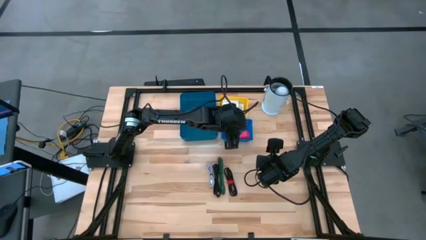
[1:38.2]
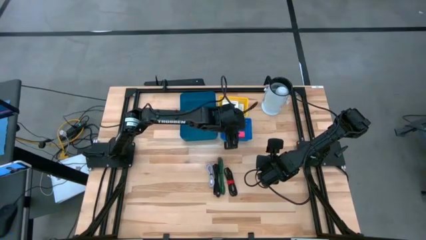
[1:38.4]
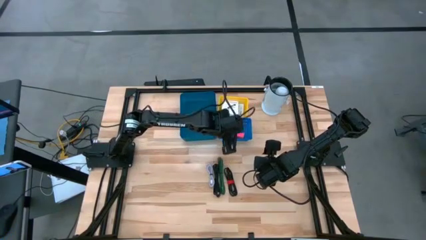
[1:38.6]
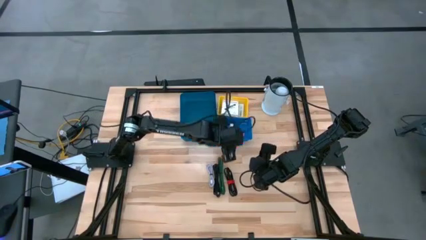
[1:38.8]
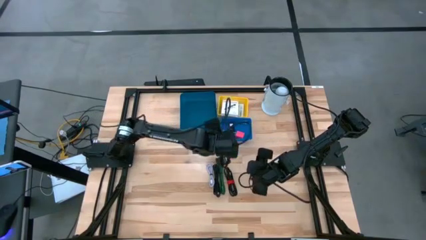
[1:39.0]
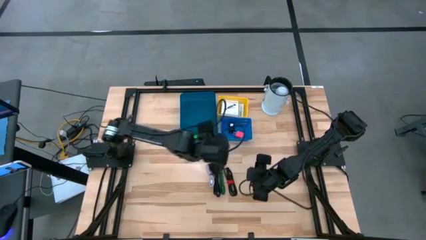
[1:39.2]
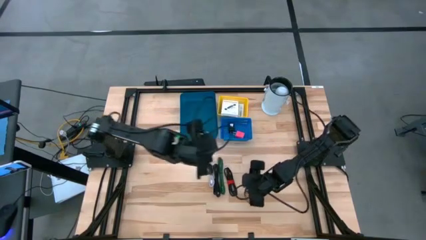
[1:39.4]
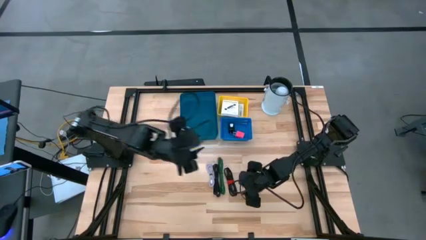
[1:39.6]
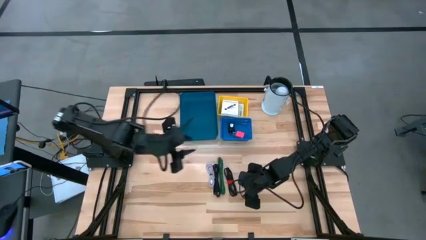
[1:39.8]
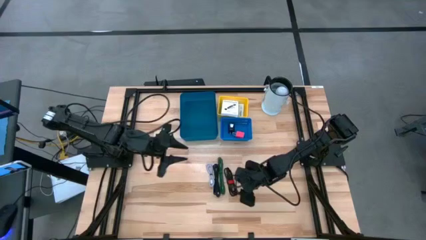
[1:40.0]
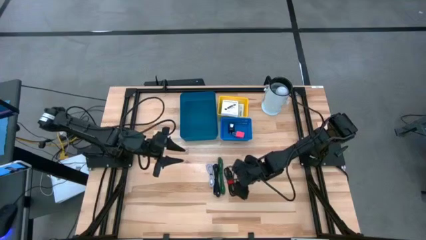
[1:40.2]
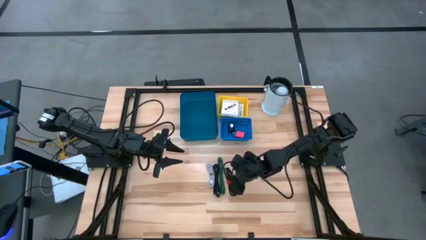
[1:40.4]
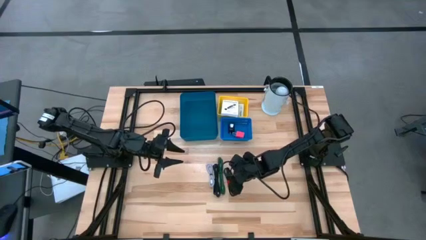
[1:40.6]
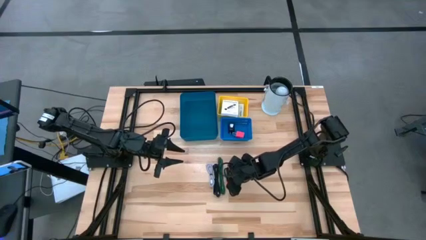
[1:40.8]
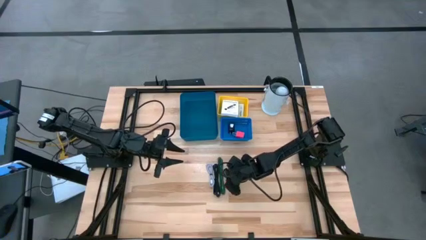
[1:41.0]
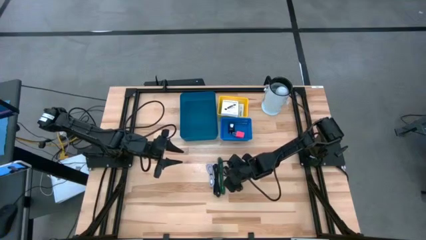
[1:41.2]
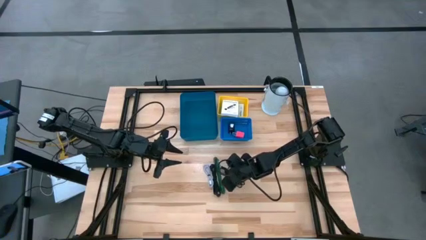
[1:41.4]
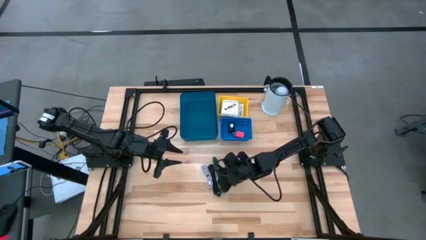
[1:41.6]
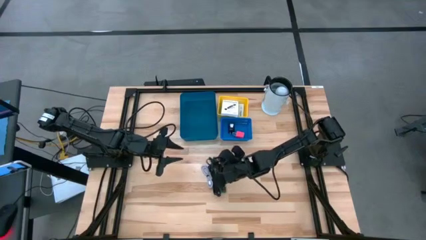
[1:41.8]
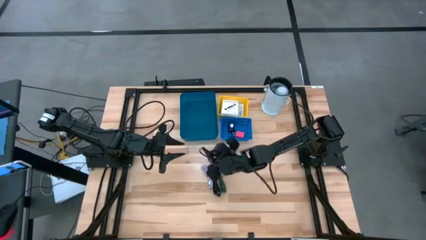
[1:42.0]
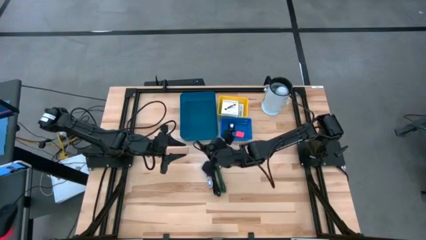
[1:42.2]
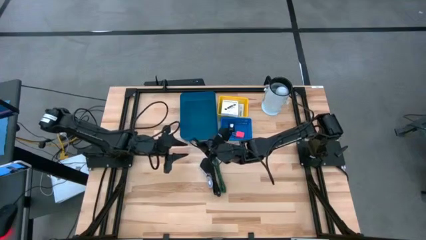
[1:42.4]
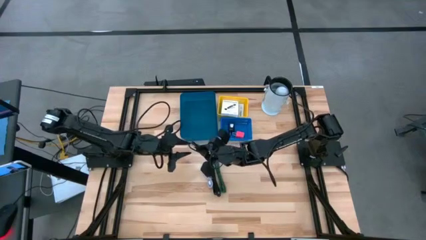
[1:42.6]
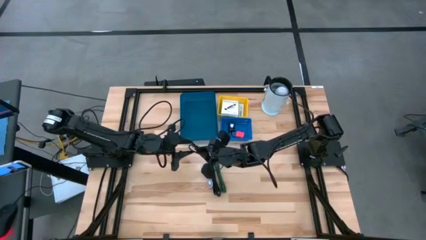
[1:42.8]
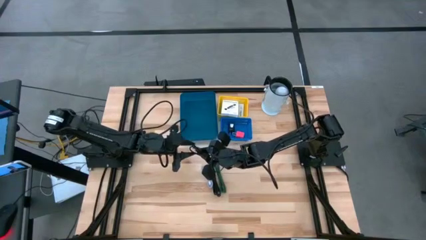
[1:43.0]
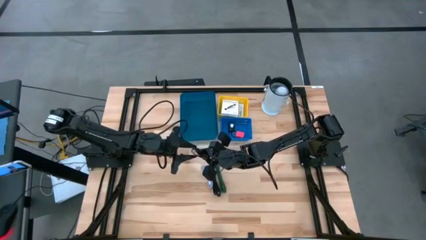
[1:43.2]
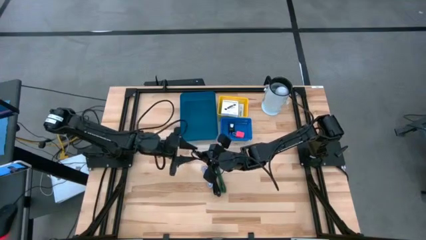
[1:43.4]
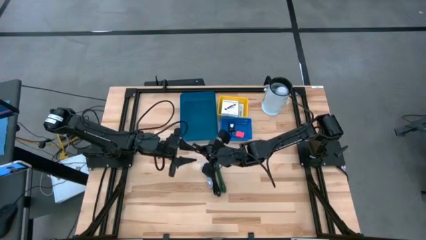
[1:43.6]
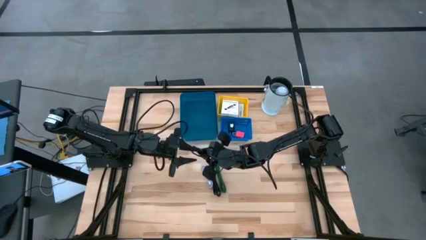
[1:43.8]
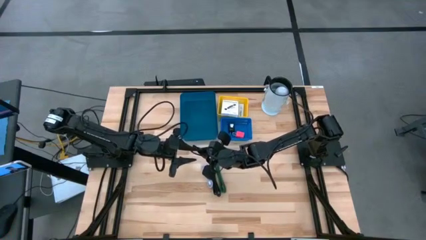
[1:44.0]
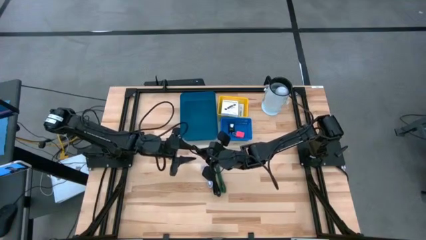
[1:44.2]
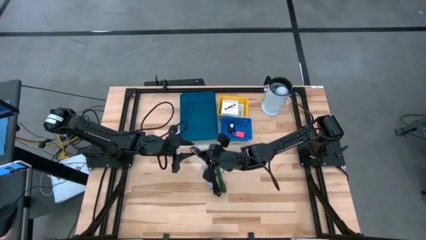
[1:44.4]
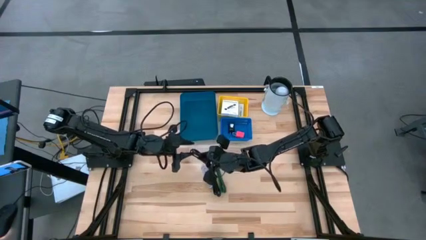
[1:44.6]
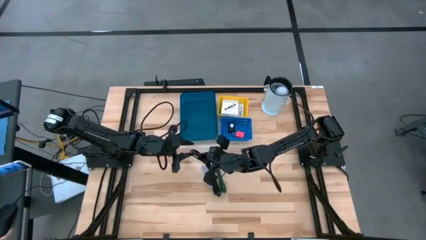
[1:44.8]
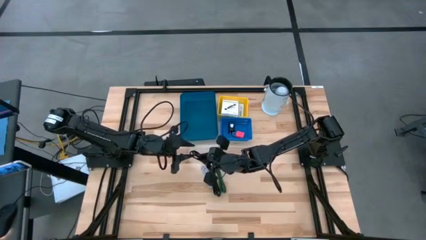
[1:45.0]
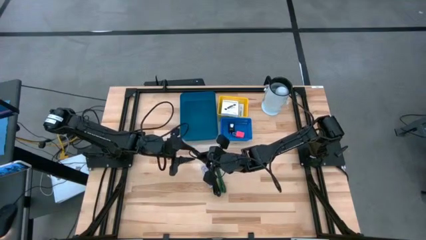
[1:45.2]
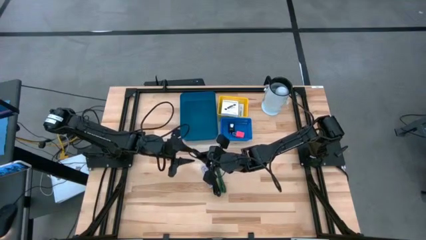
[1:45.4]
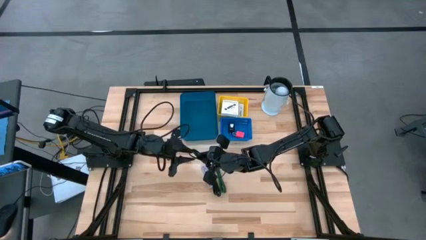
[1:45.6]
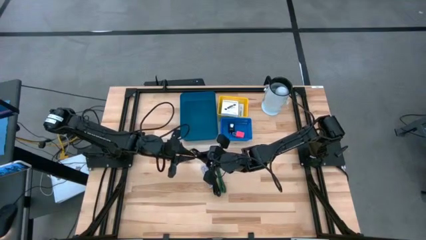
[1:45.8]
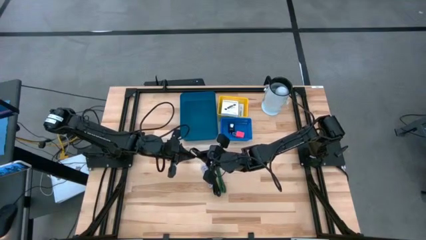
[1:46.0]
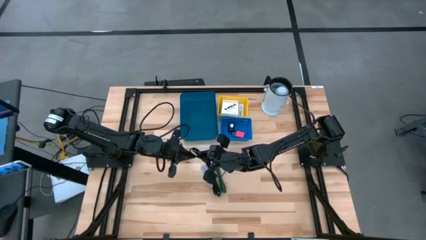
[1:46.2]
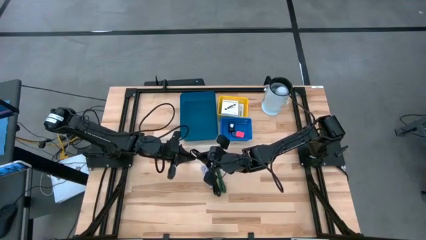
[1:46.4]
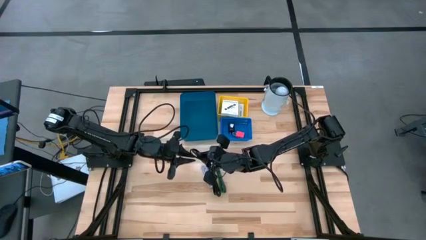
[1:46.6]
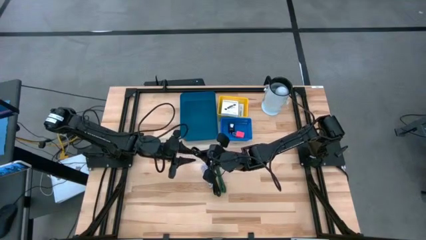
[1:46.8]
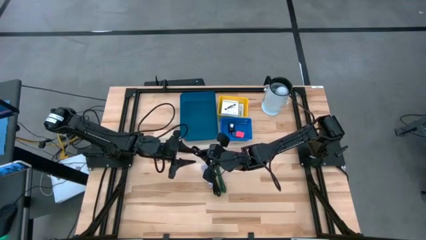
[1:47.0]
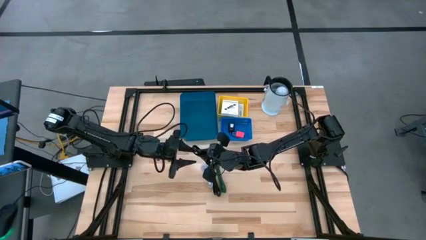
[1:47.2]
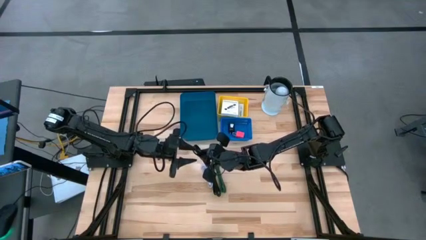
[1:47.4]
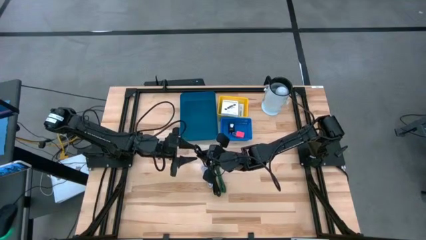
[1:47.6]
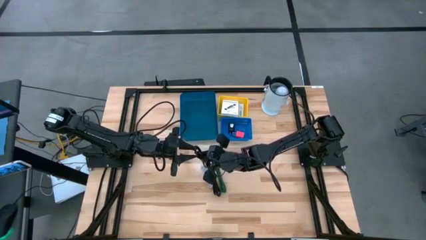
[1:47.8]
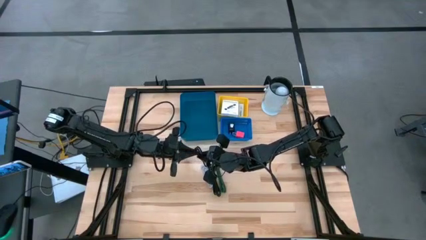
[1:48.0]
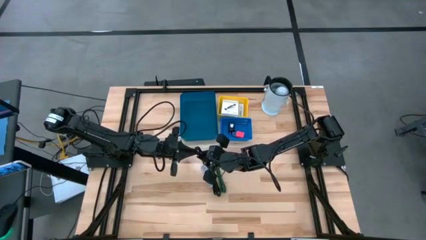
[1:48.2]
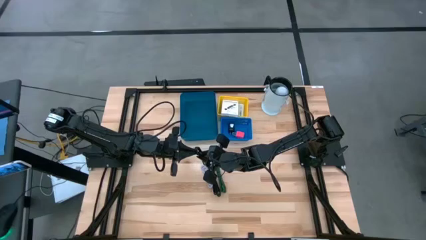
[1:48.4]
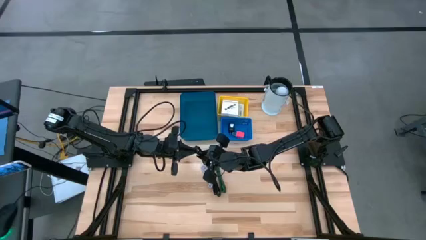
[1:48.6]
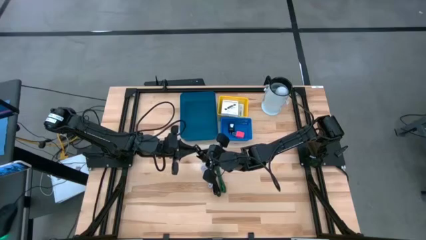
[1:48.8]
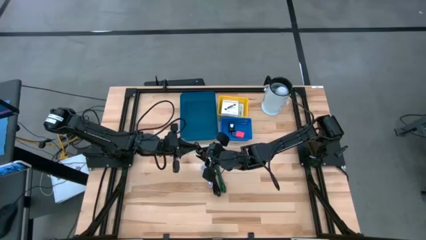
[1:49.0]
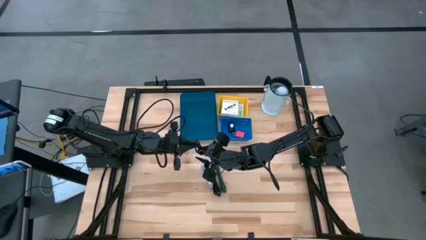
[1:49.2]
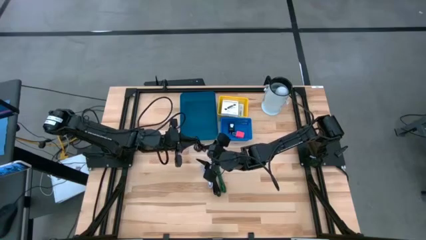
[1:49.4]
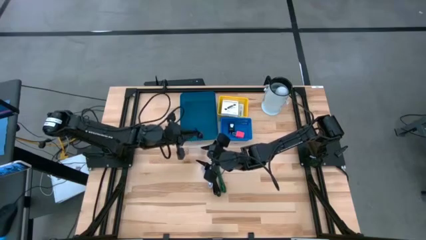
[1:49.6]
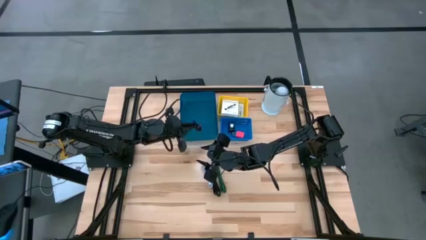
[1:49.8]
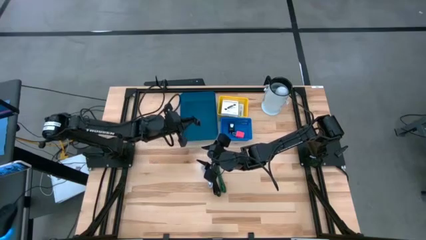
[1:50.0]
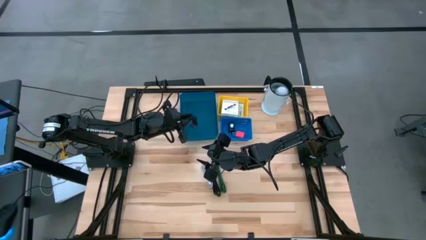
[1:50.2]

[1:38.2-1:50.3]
Task: Pick and place items into bin
Put the right black charger cable into the big dark blue bin

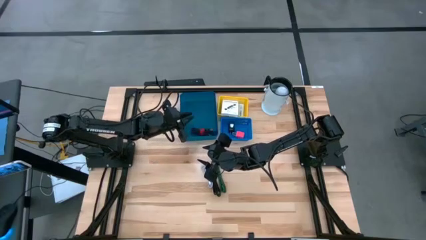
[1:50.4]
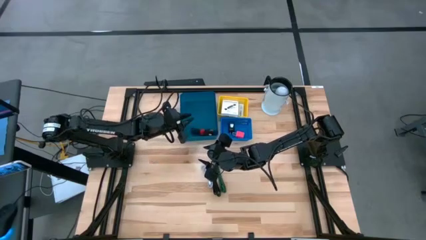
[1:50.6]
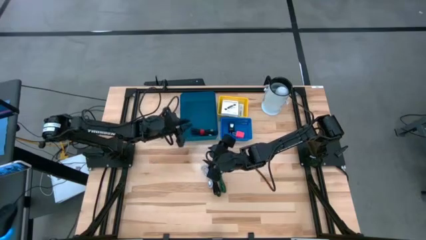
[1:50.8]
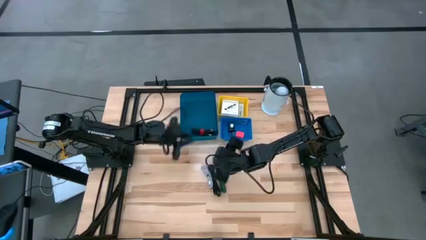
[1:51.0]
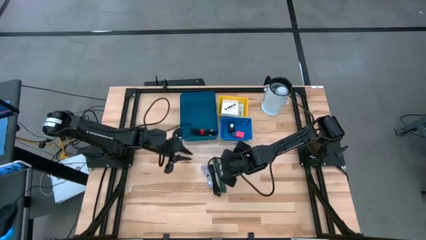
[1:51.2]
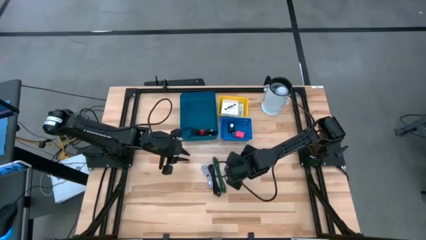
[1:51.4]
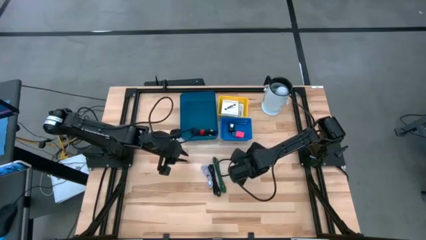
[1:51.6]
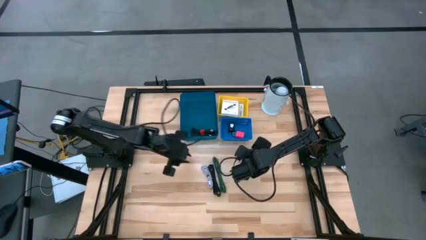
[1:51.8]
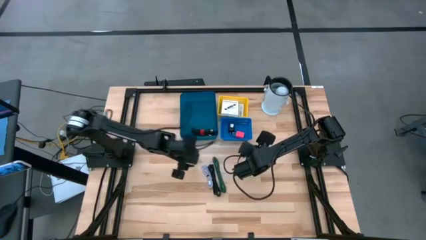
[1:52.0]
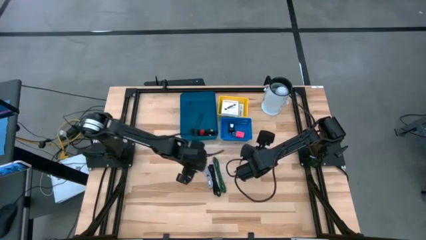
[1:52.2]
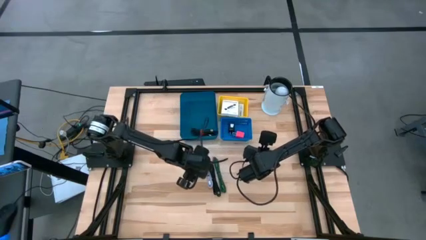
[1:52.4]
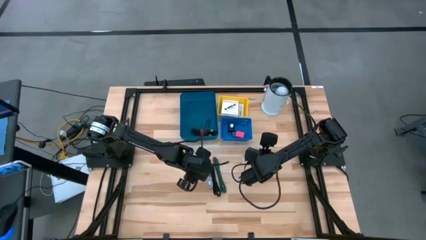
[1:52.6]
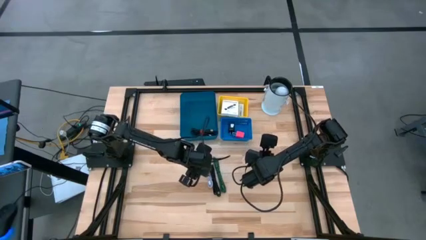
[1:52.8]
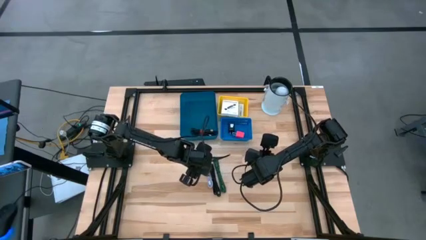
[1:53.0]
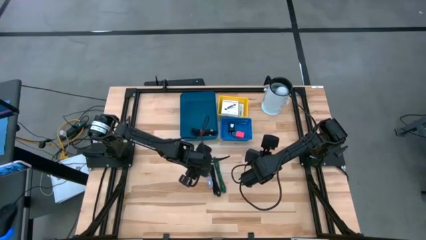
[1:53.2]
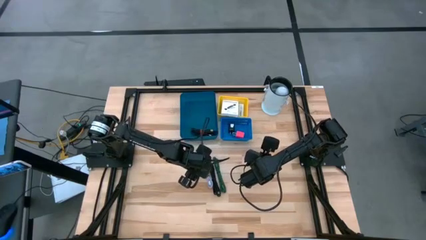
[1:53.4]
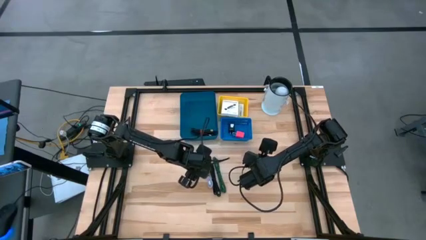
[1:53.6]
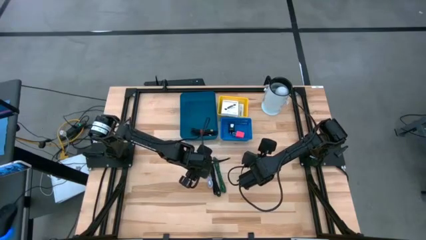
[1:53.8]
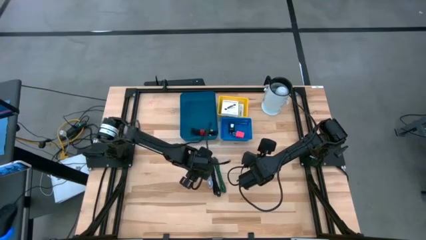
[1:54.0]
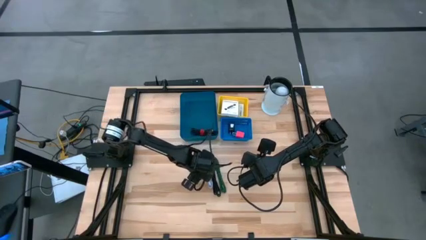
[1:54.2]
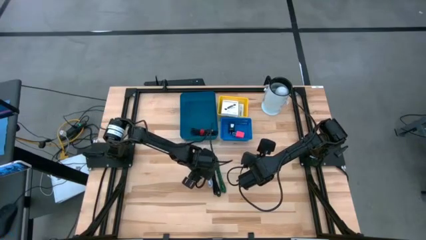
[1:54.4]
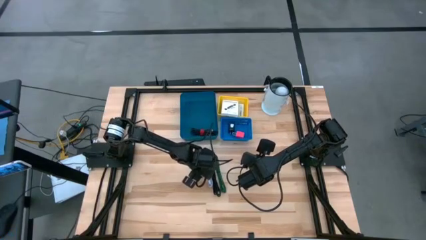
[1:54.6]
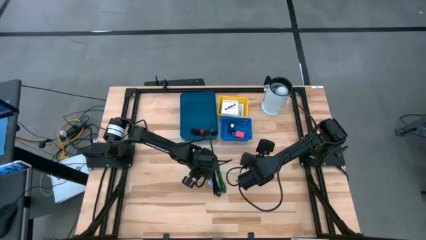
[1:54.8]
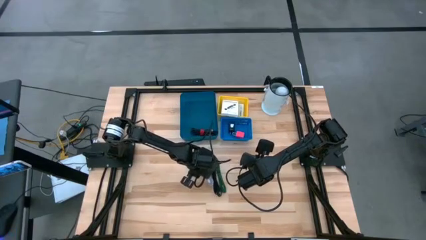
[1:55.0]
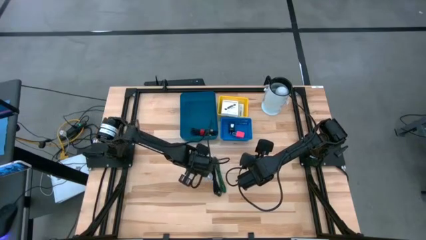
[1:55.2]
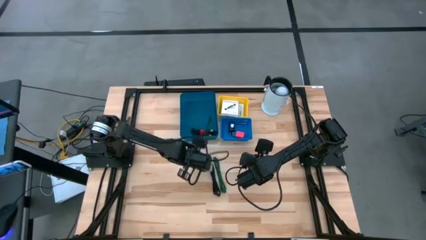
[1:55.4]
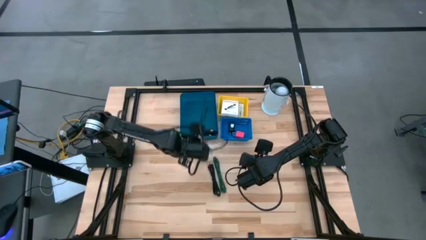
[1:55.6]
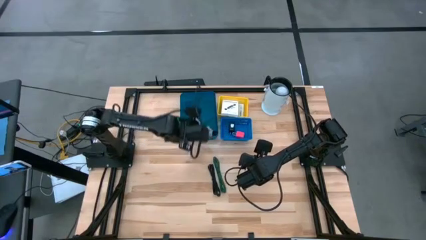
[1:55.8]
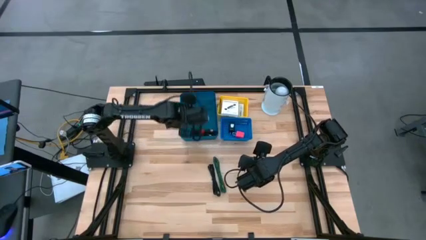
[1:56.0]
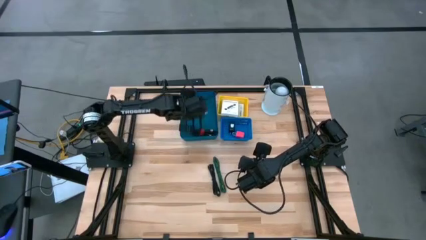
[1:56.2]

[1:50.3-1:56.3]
Put the white charger cable into the big dark blue bin
